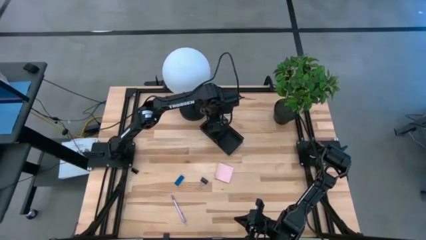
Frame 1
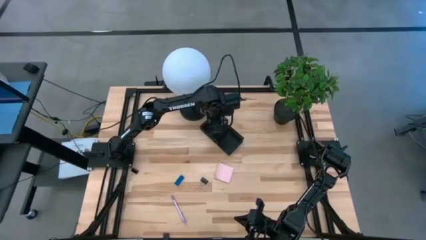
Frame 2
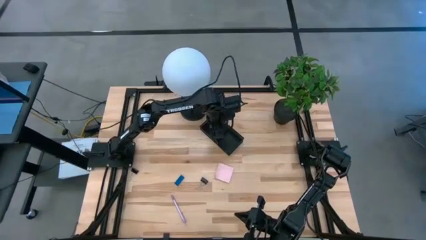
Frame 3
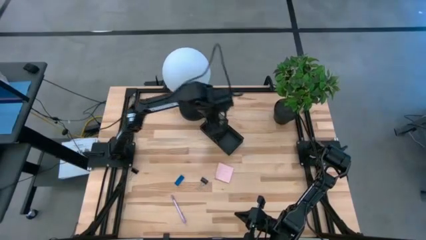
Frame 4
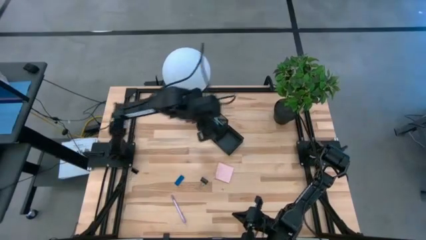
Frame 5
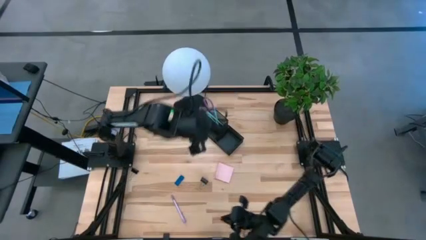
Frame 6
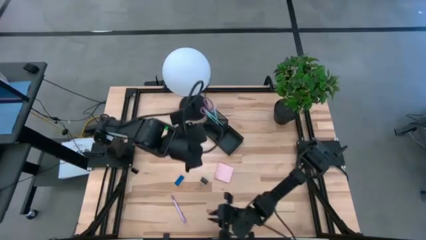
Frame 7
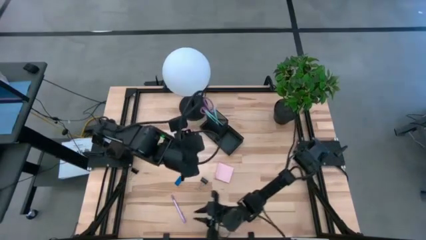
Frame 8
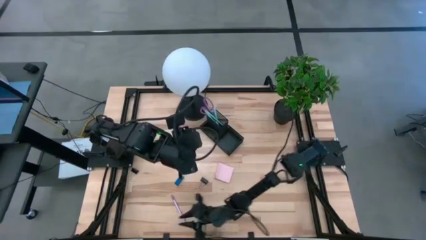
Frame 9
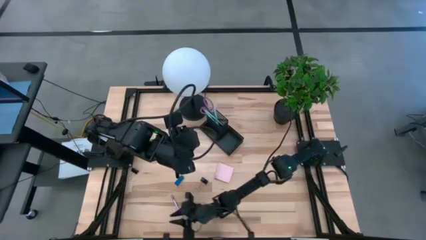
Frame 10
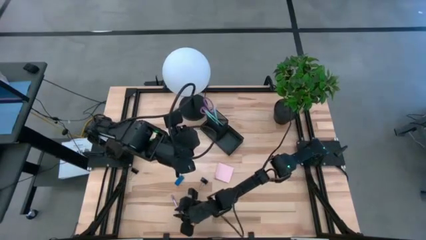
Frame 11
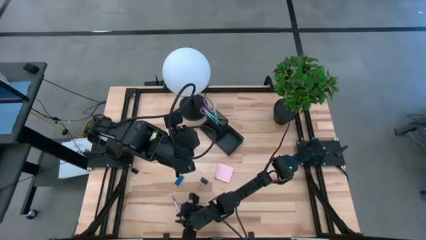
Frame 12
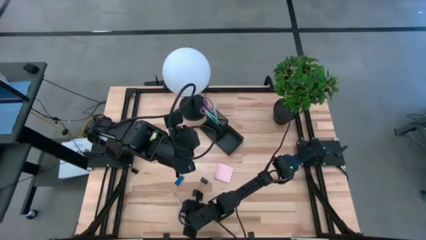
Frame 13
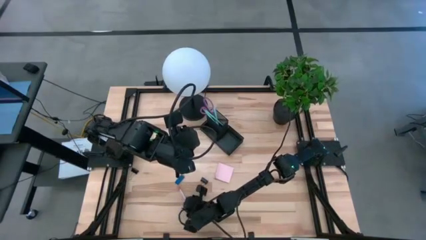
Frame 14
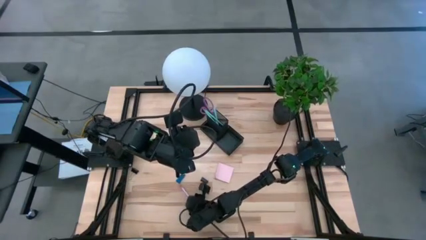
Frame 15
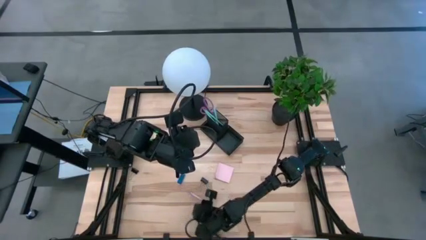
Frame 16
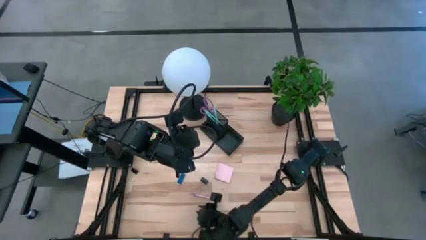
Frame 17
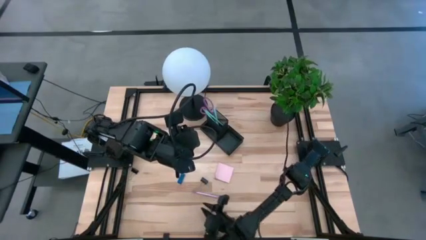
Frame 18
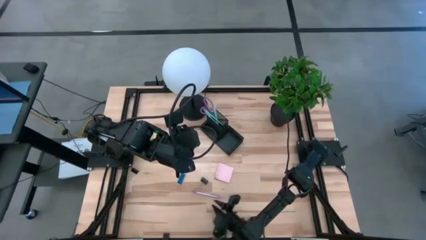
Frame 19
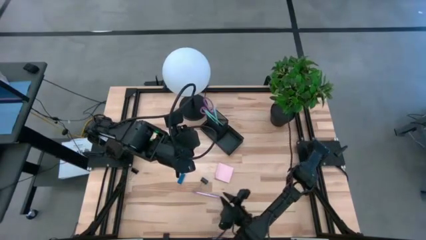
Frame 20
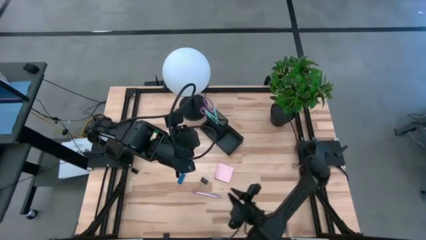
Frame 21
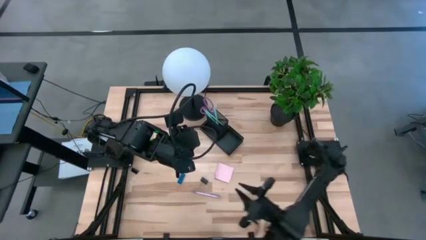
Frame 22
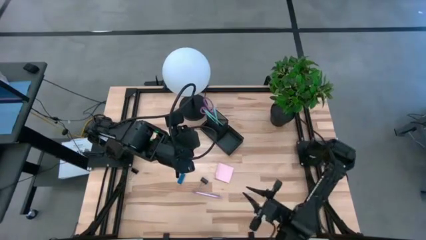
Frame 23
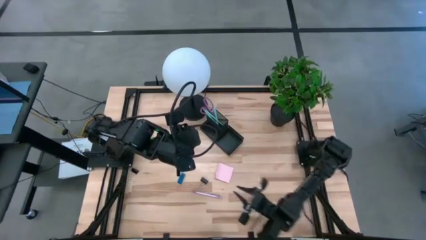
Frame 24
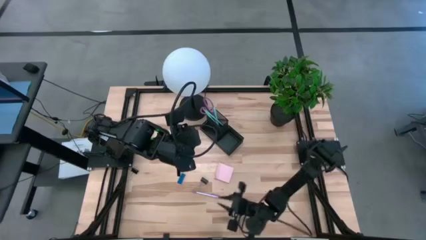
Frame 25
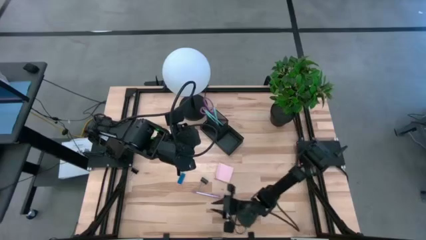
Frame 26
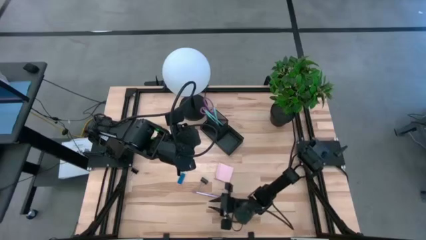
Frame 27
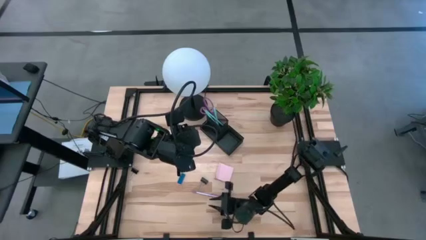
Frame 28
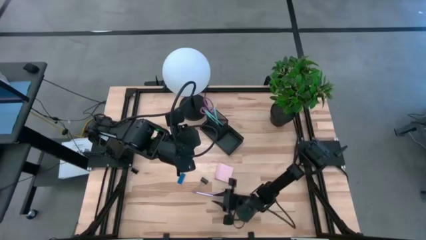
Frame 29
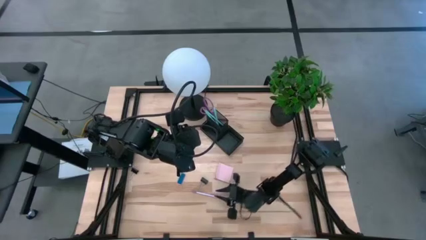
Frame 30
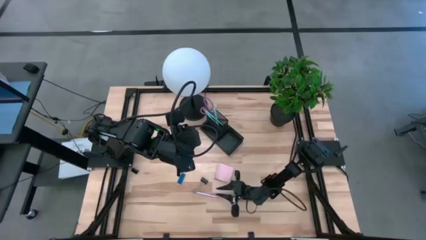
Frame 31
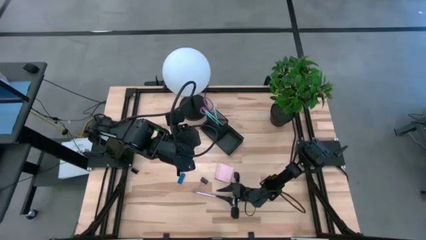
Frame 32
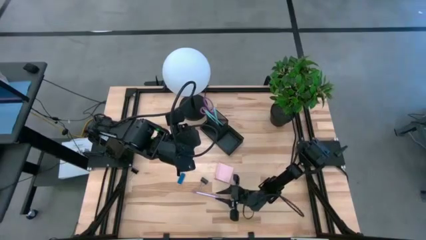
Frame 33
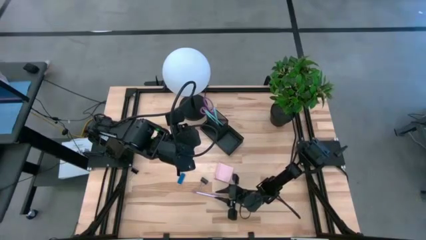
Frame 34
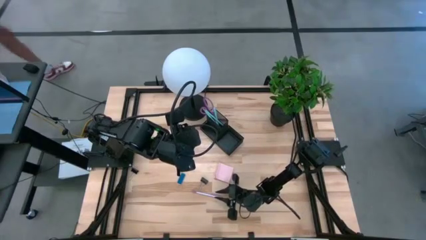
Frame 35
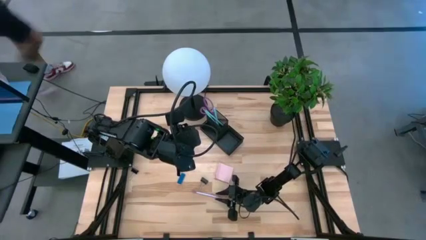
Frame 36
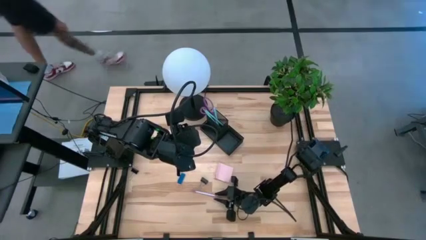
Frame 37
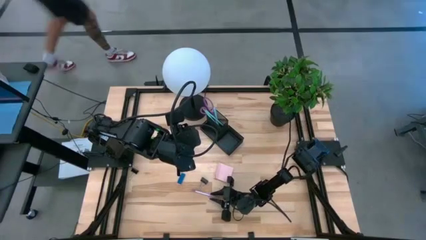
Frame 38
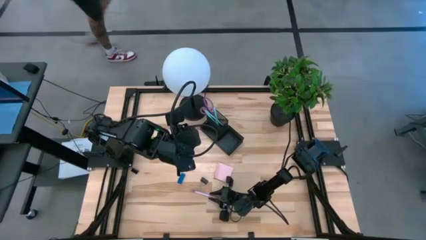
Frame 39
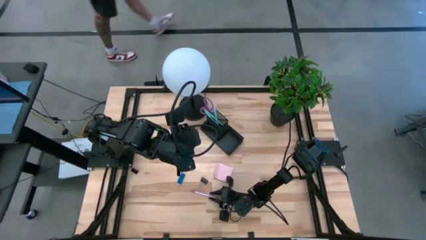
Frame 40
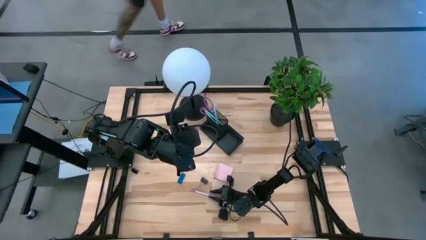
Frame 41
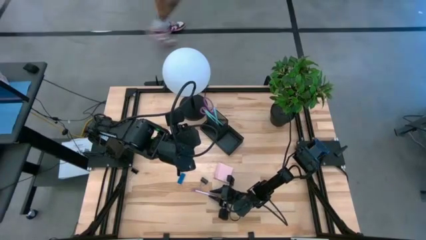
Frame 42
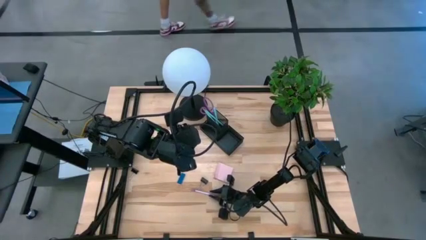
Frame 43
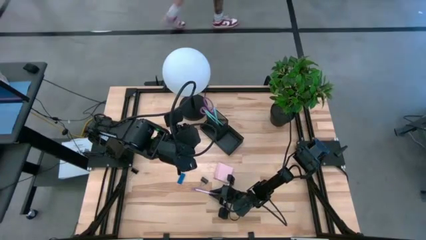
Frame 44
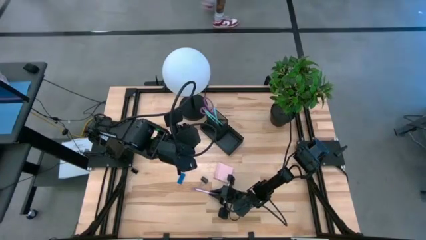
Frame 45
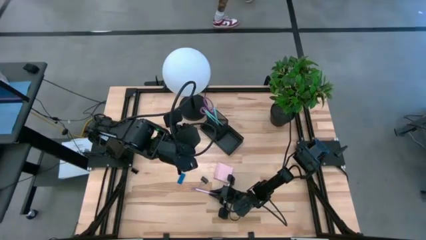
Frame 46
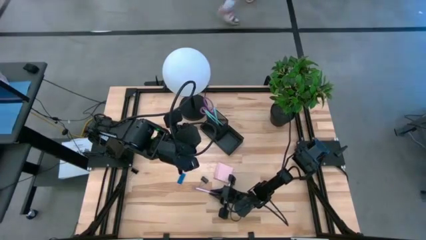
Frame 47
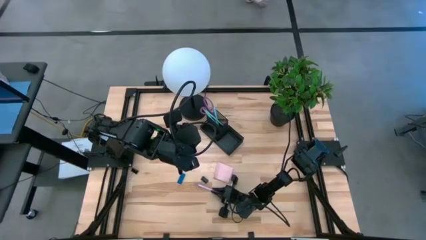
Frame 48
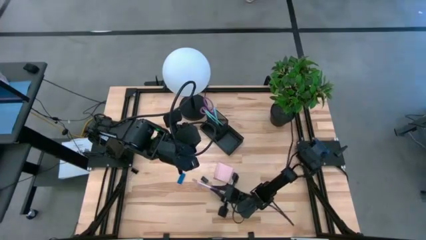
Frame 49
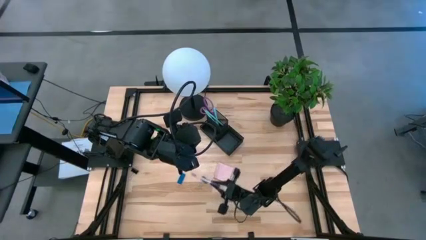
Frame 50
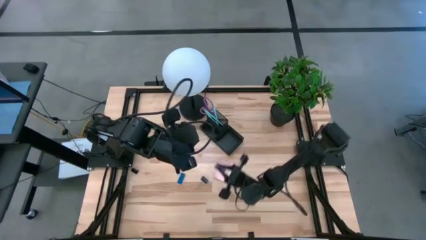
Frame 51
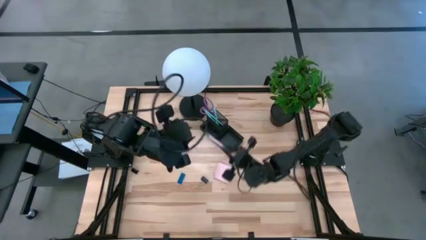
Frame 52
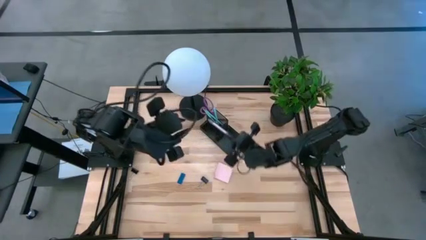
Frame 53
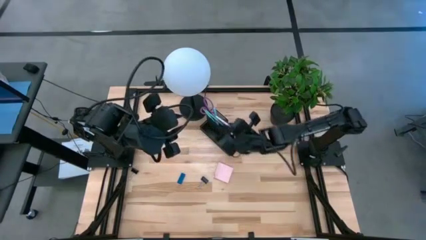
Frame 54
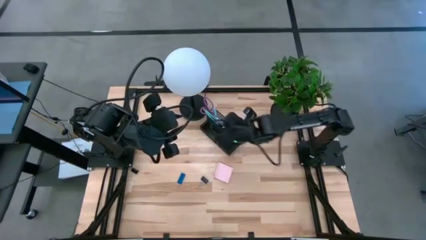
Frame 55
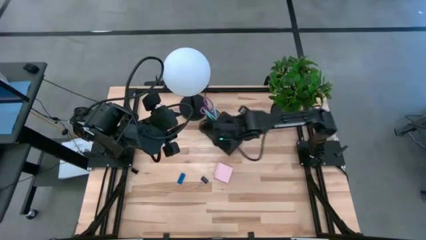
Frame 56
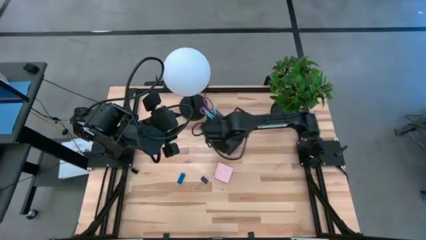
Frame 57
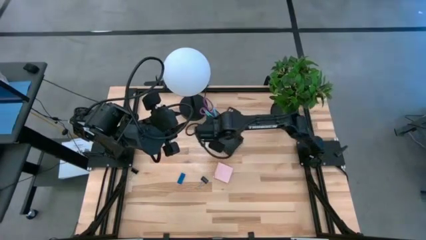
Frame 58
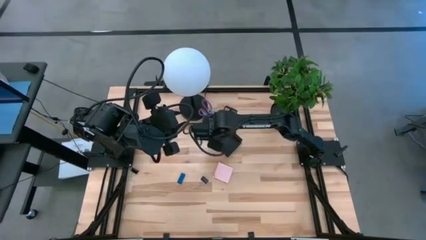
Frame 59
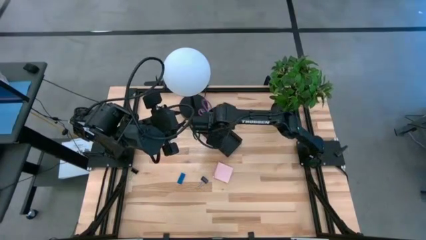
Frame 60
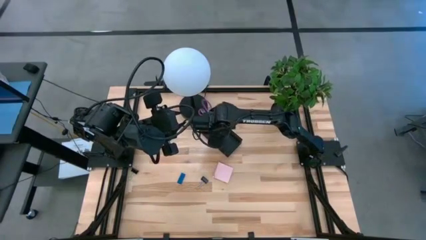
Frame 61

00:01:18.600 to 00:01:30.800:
Task: Pick and place office supplies into organizer
Put the violet pen into the desk organizer

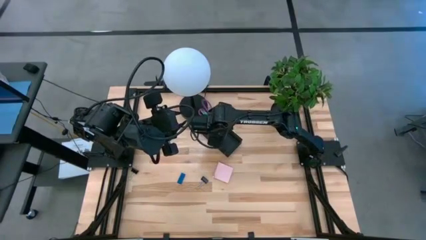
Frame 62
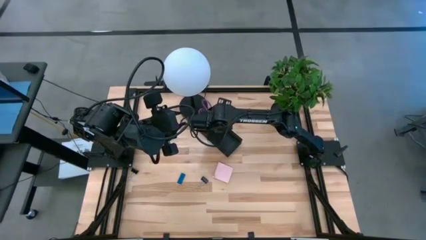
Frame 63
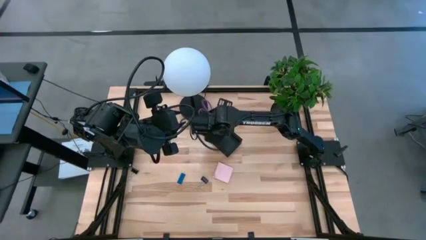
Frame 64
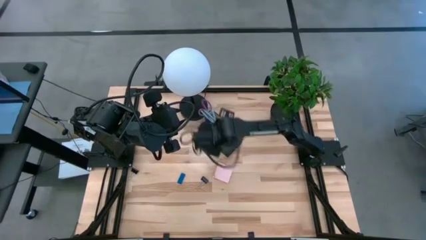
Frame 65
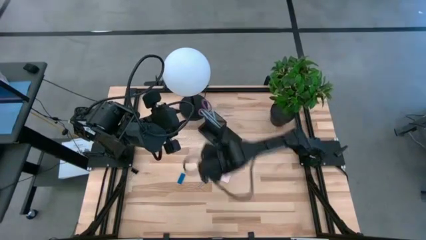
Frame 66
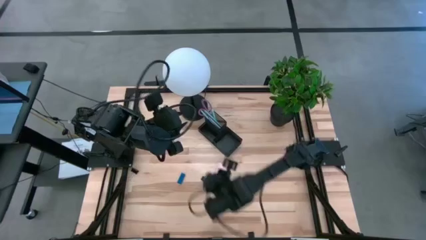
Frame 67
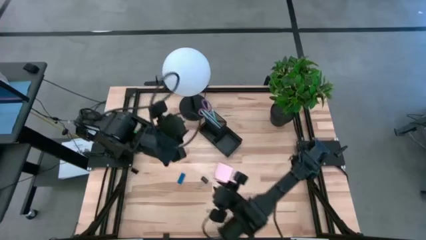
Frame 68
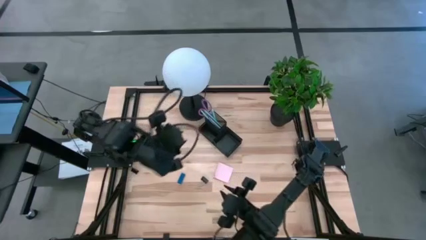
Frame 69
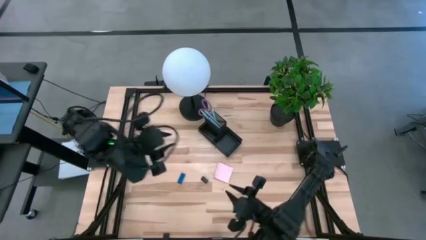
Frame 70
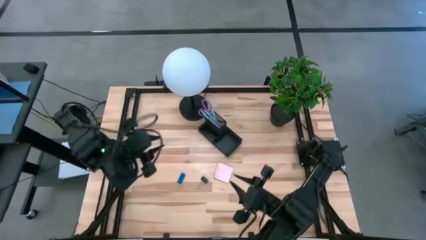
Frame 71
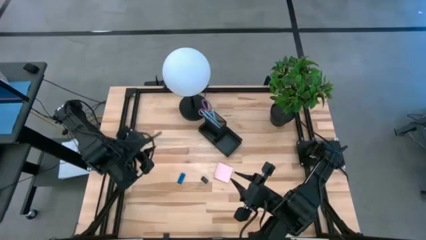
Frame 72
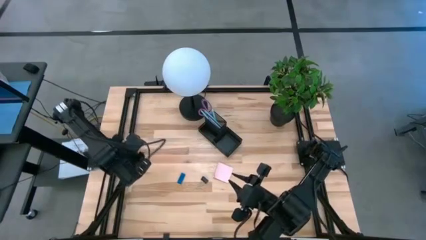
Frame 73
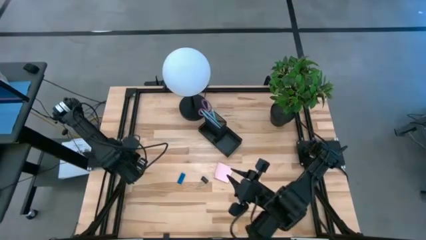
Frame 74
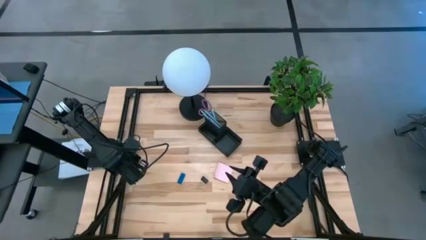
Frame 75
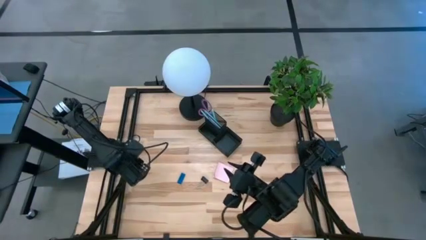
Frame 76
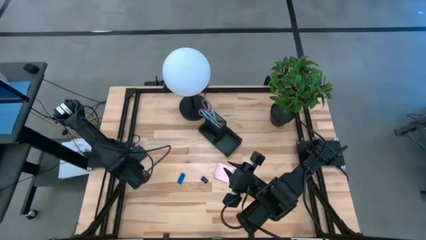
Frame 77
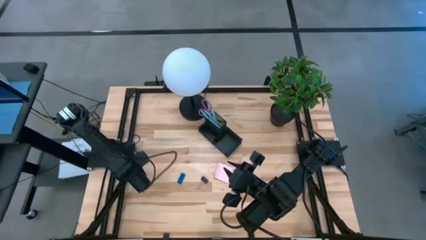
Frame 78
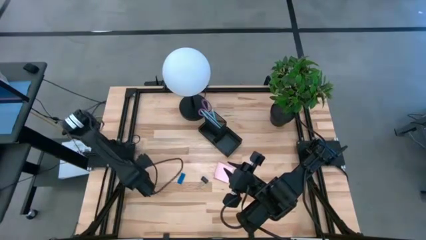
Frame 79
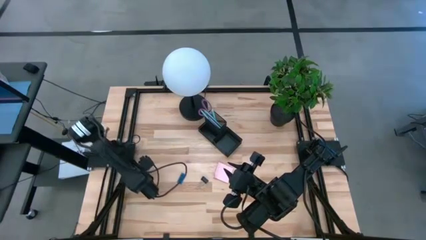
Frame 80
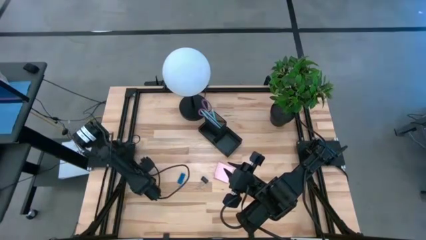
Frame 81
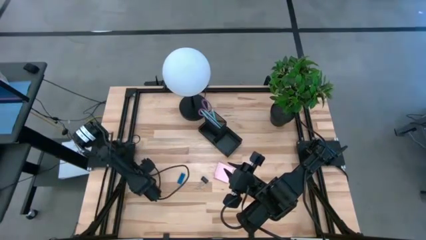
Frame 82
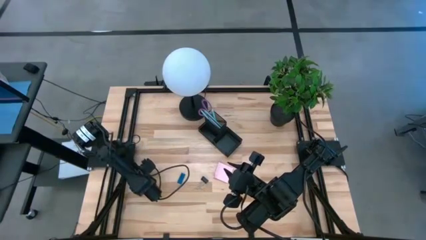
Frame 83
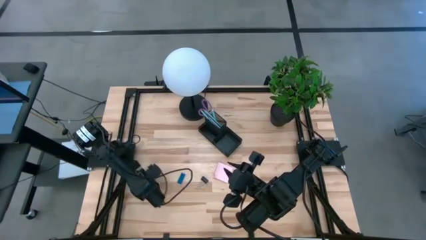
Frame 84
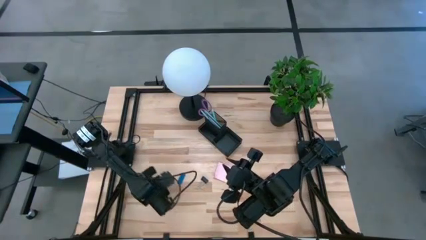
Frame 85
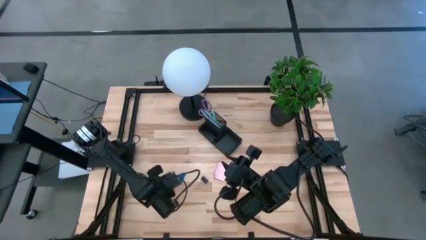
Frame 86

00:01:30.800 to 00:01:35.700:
Put the left binder clip into the desk organizer
